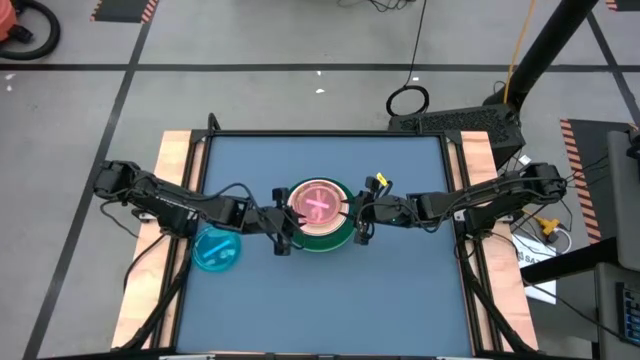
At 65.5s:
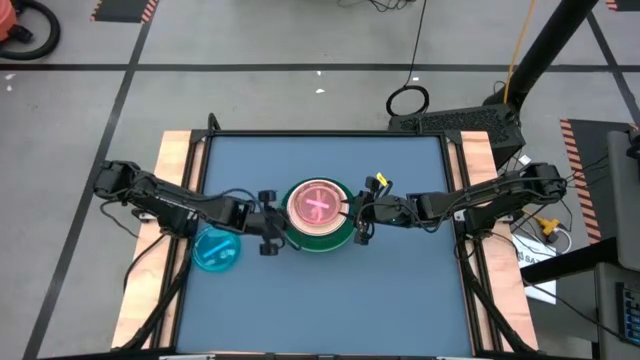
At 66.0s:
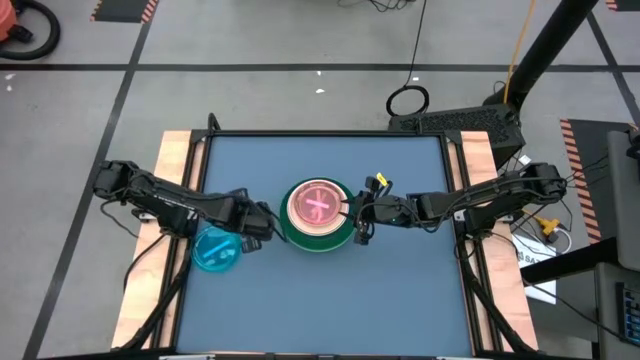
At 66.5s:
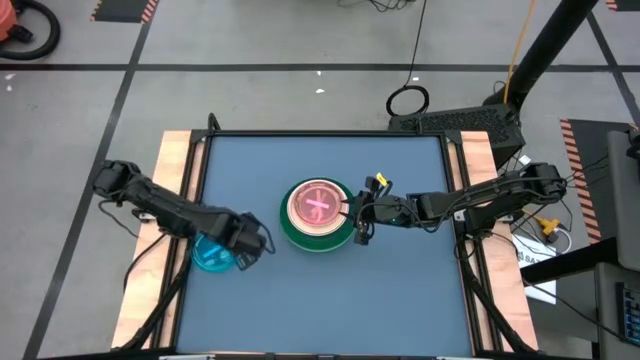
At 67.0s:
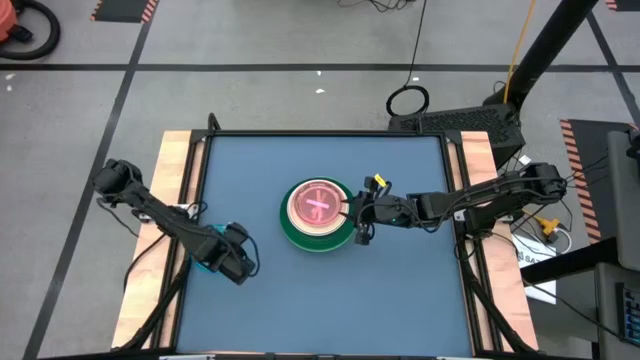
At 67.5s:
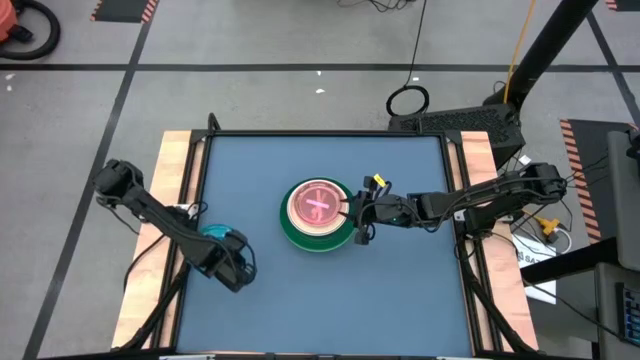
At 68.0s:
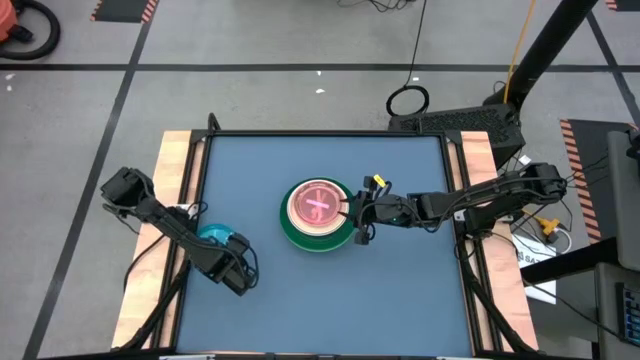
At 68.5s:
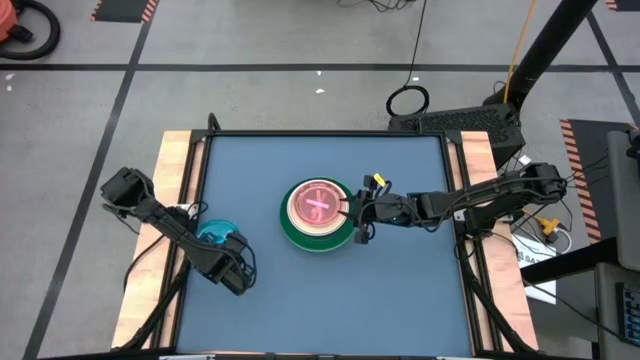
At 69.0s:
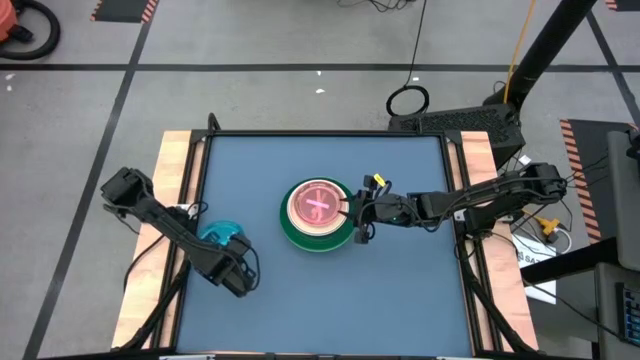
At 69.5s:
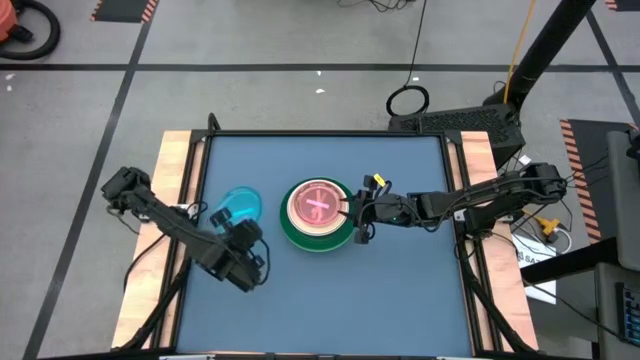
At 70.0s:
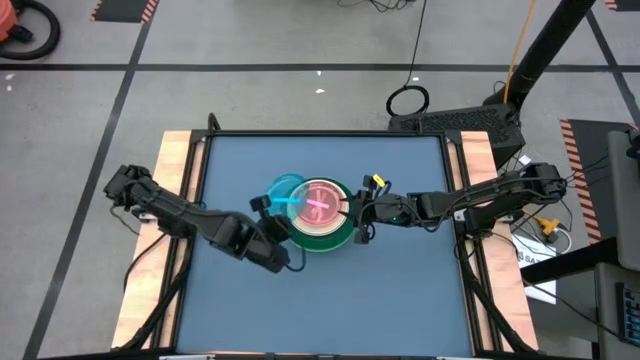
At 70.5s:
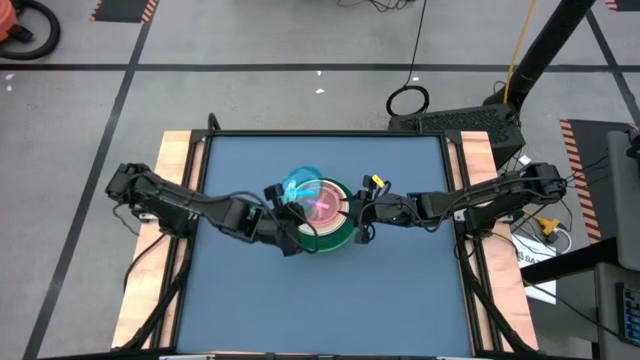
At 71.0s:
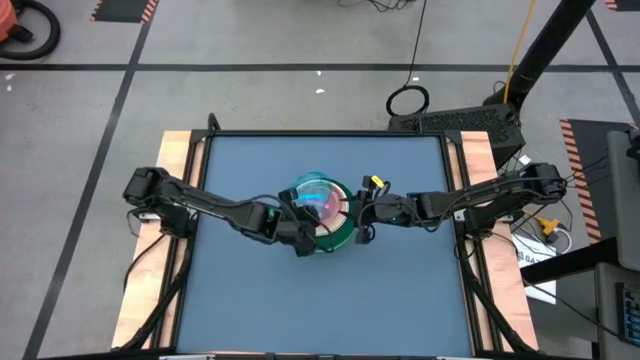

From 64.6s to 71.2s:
Task: Stack plastic plates
Stack the transparent blue plate on top of the transparent pink plate

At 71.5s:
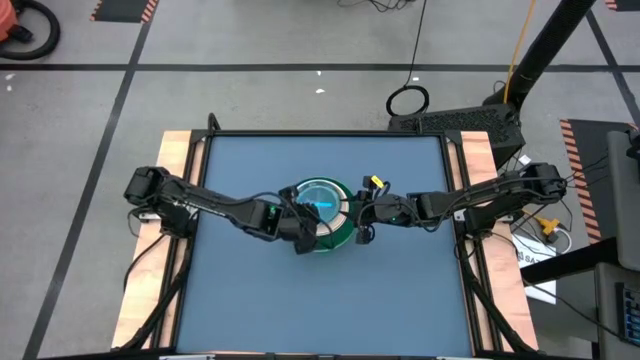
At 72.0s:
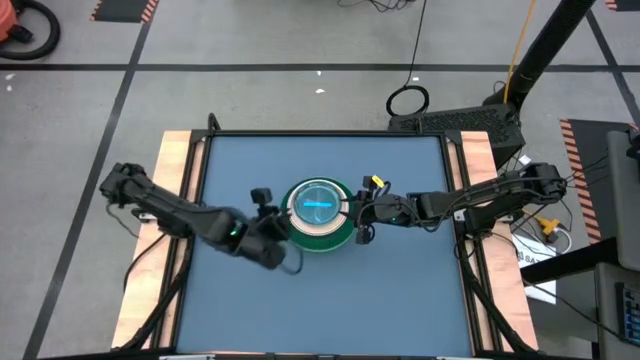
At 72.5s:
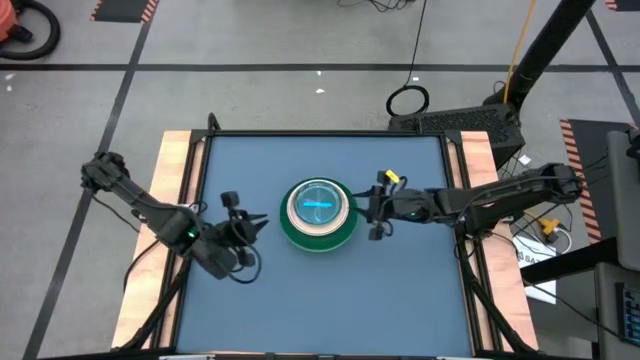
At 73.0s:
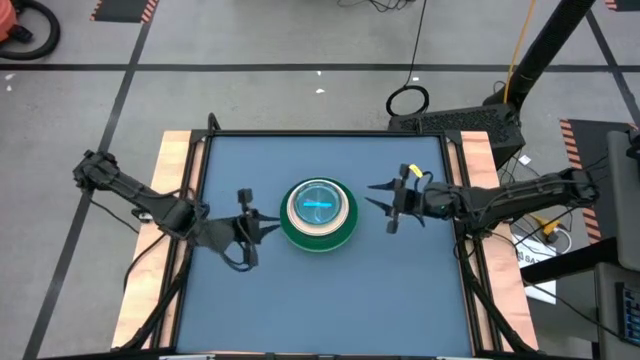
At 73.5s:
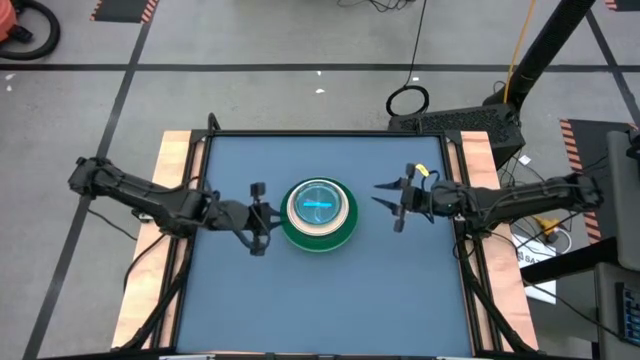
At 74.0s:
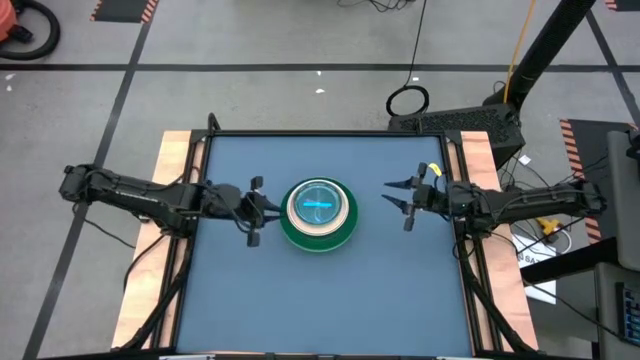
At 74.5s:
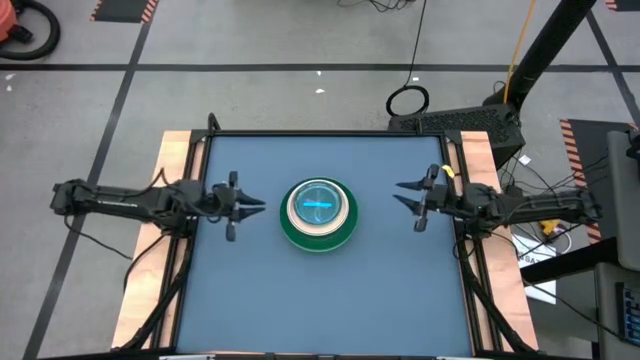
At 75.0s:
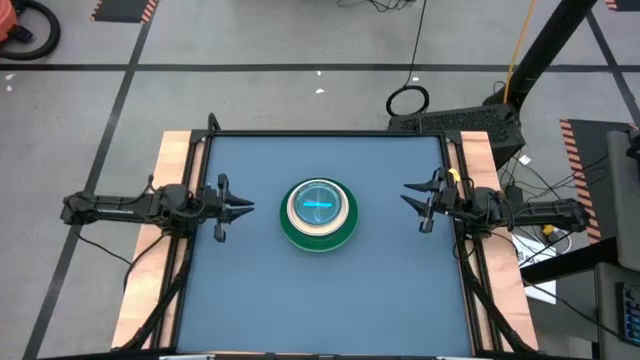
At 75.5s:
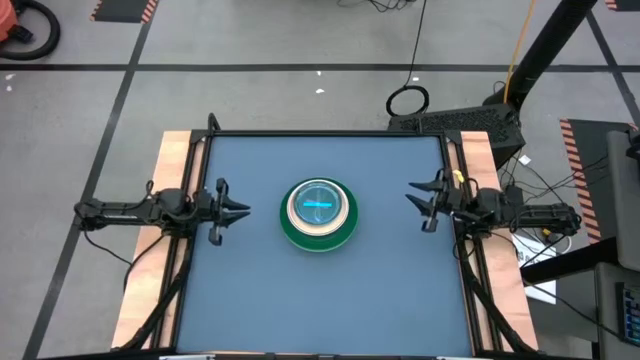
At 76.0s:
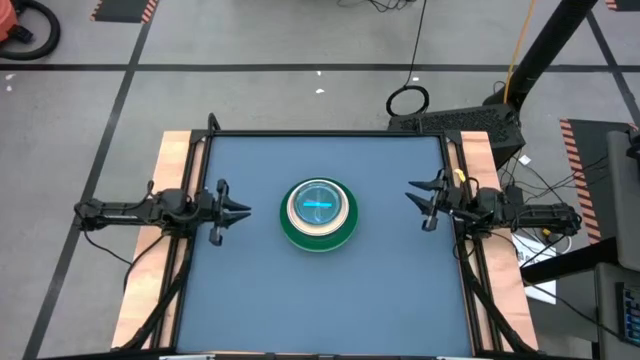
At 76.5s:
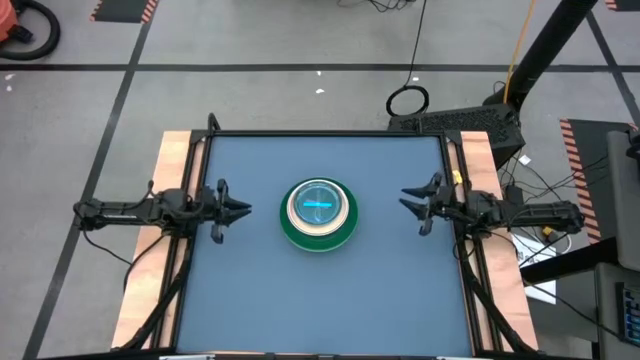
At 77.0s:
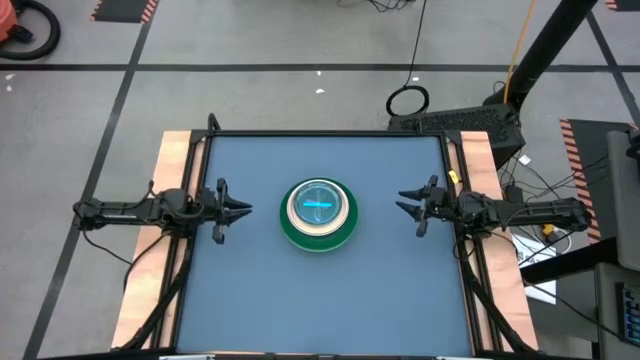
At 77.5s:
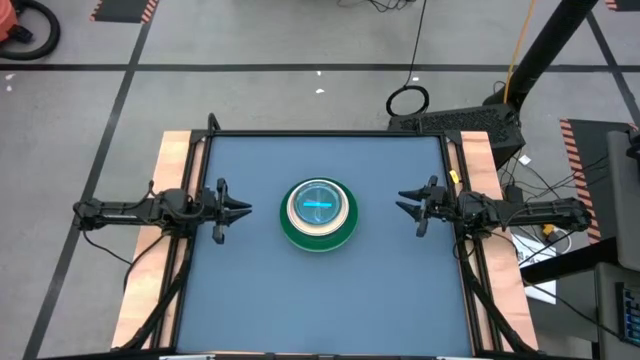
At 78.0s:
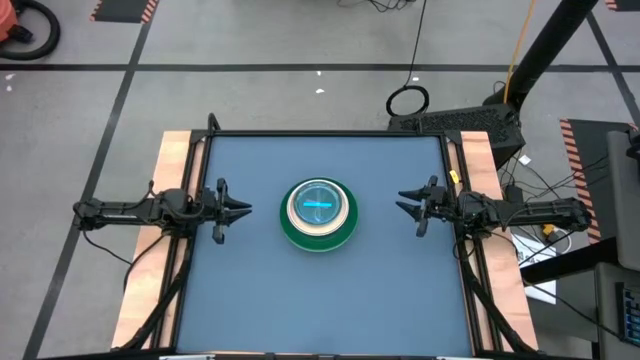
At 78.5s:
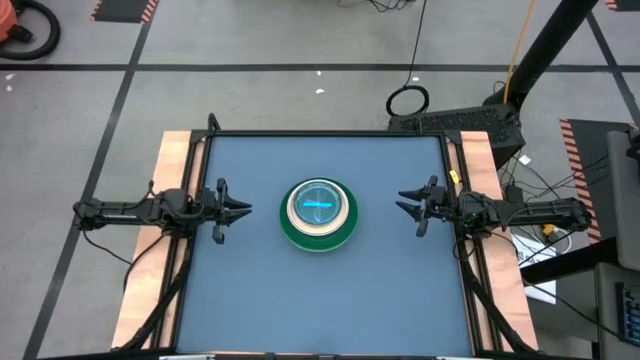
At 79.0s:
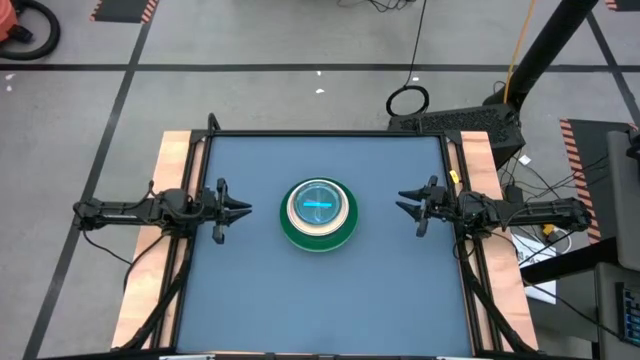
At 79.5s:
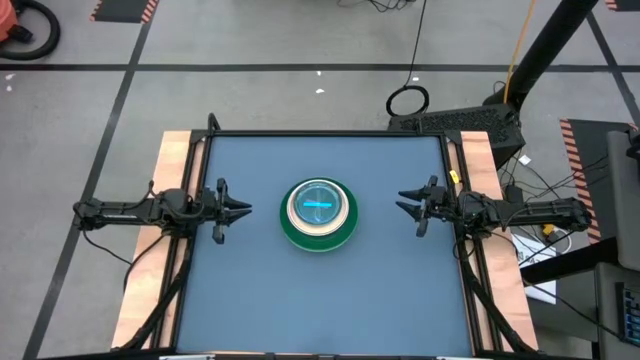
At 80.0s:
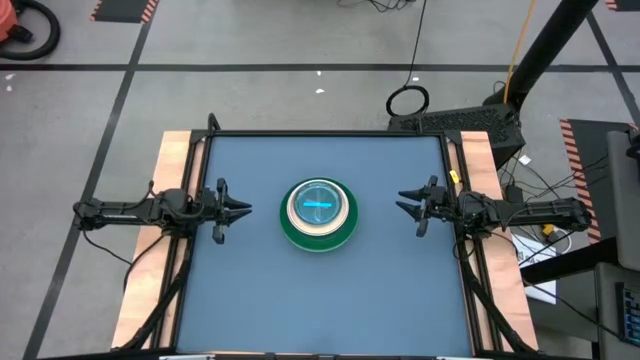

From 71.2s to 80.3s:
Return to Home Position

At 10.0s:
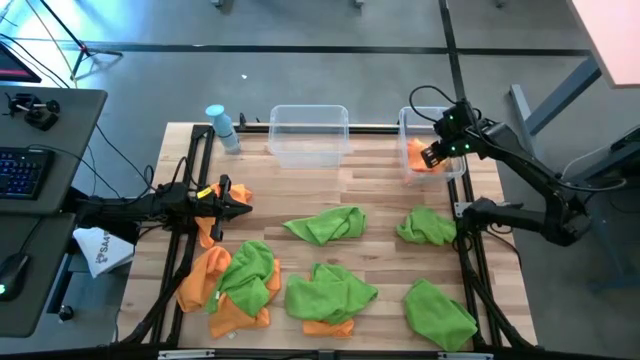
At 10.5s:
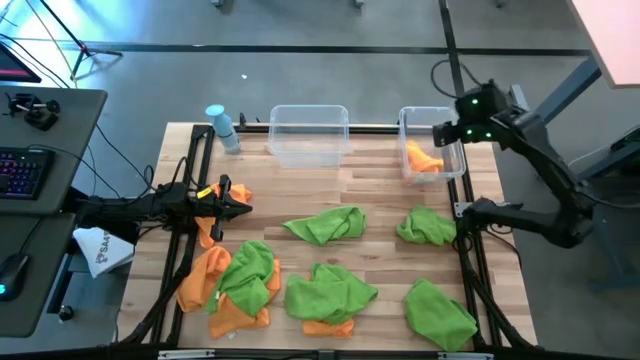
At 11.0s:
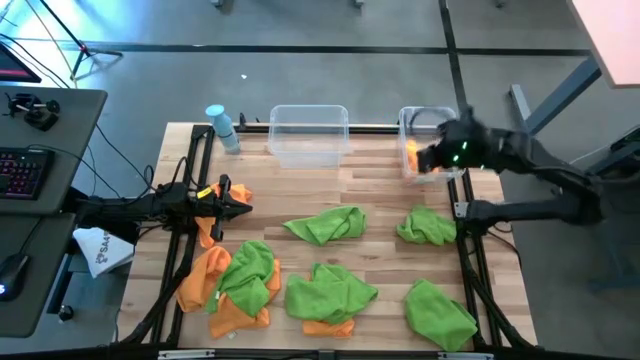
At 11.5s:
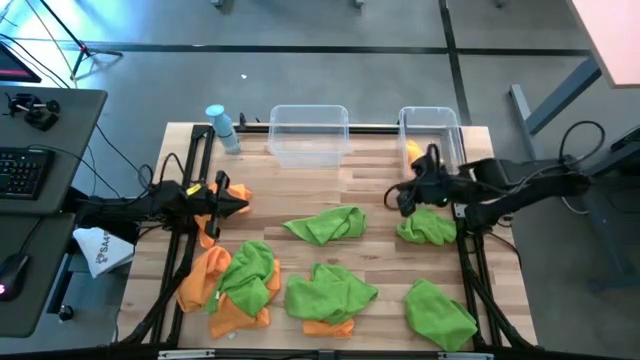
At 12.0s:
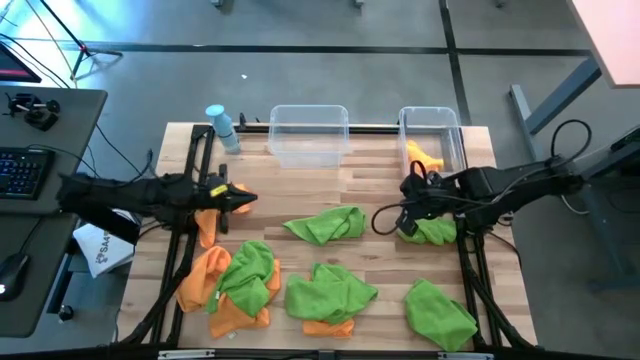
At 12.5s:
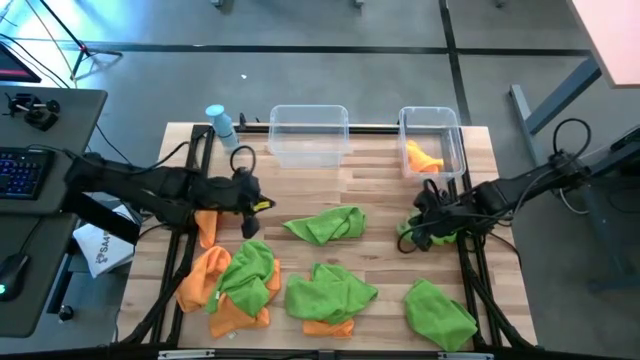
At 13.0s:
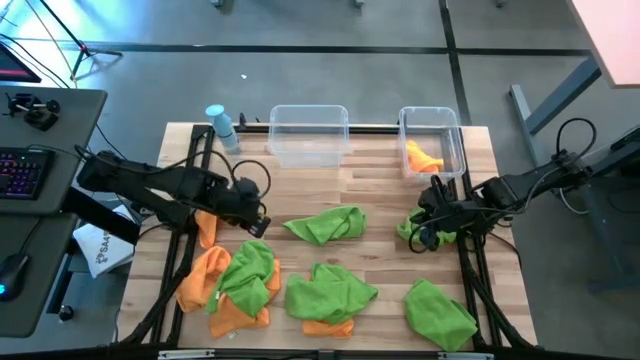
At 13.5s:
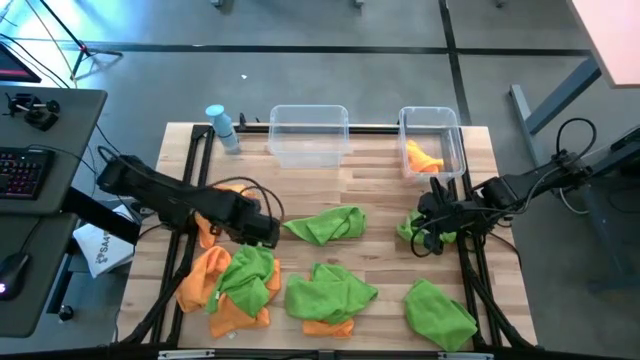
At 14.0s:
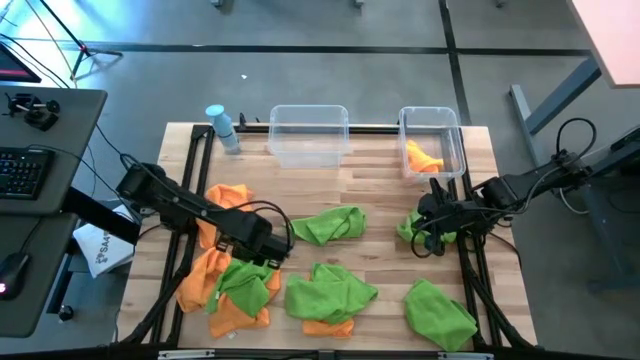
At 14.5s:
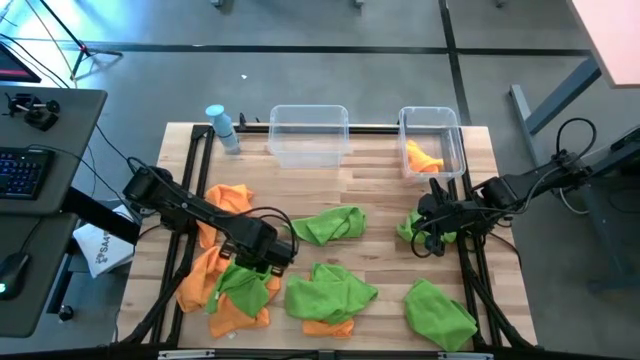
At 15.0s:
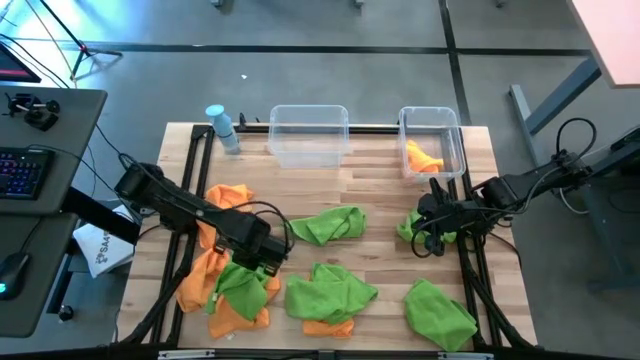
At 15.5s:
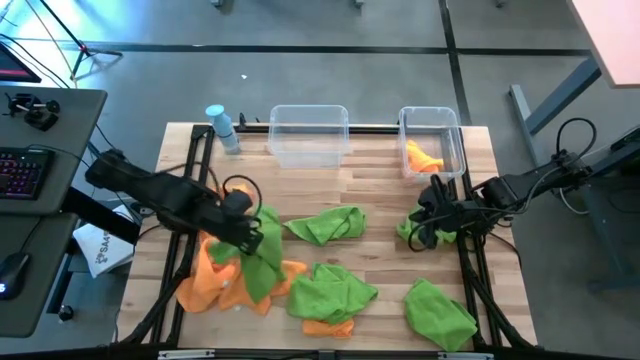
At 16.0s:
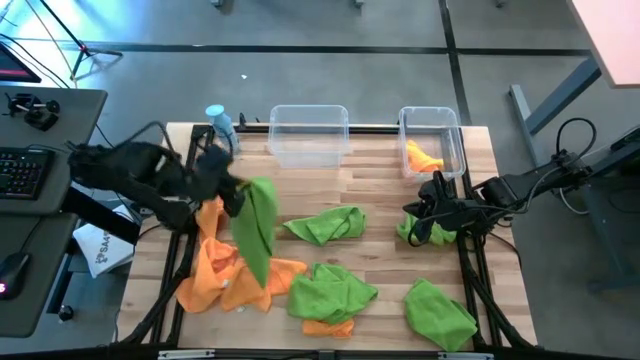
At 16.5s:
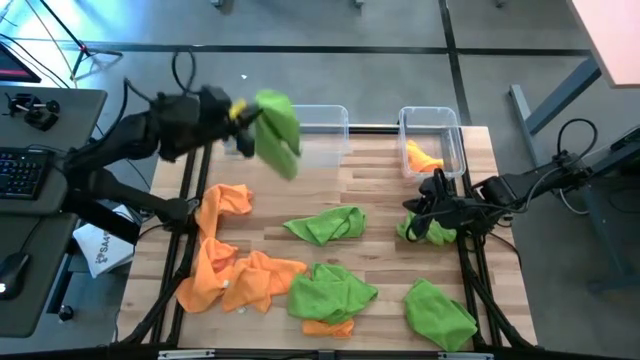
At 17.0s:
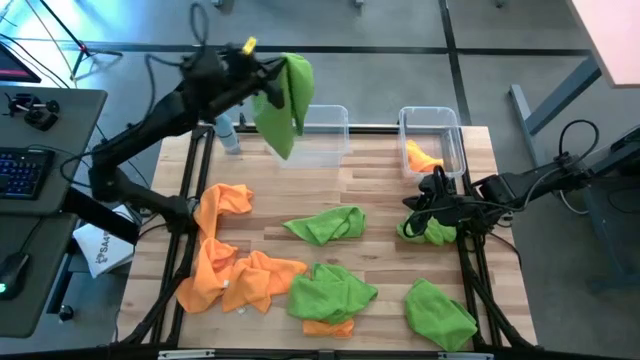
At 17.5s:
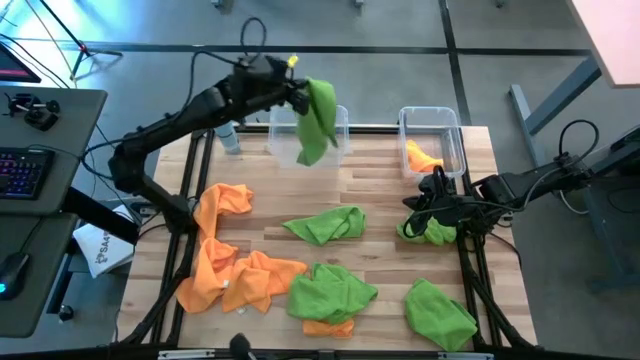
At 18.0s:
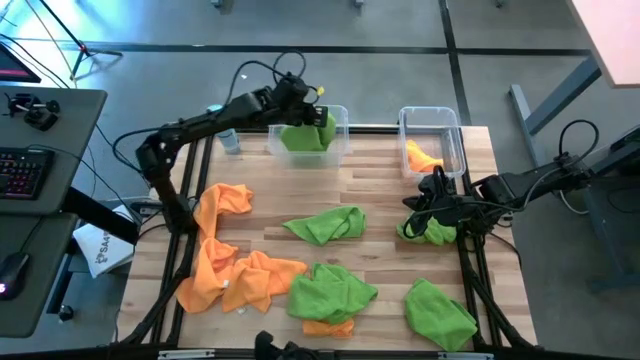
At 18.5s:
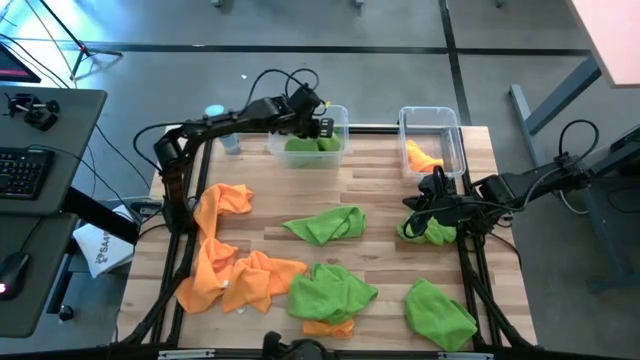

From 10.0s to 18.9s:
Task: Sort microfiber towel by color & place in baskets
Put the green towel into the left transparent bin
